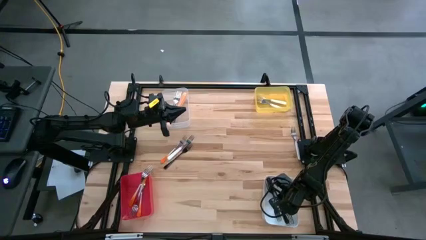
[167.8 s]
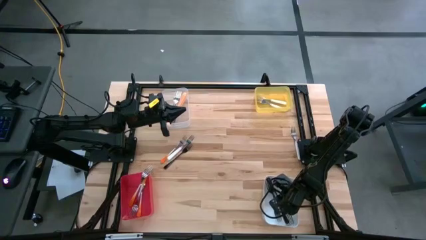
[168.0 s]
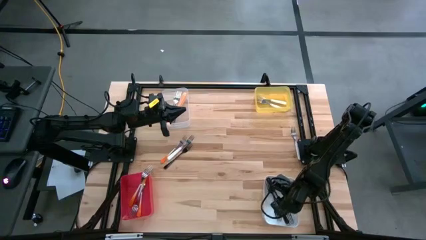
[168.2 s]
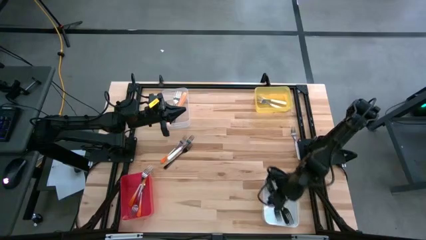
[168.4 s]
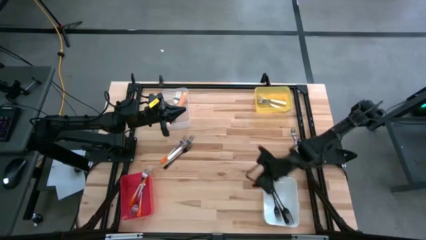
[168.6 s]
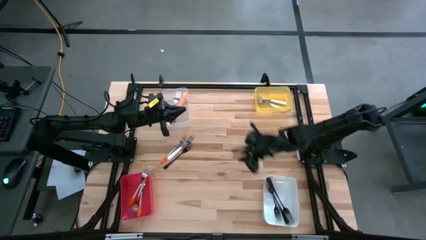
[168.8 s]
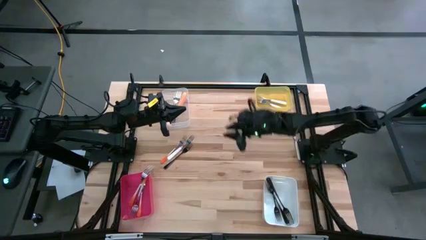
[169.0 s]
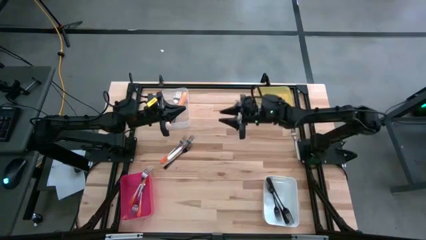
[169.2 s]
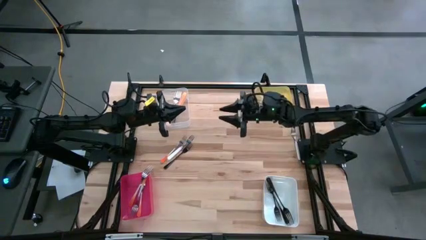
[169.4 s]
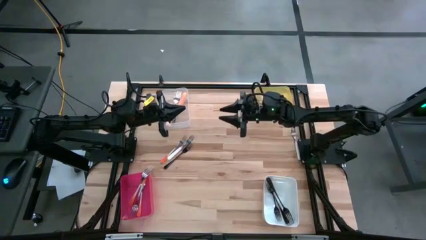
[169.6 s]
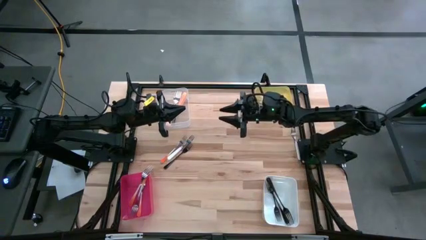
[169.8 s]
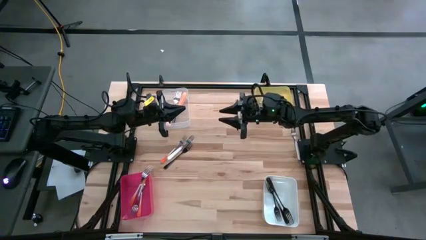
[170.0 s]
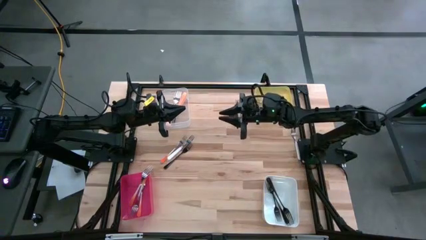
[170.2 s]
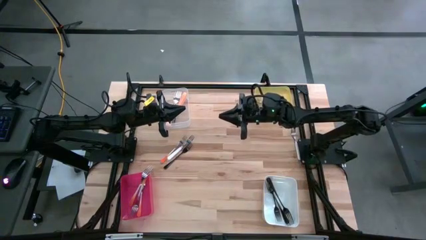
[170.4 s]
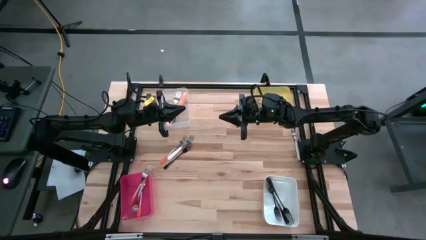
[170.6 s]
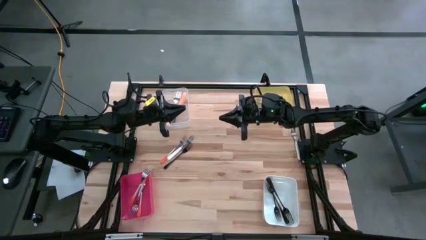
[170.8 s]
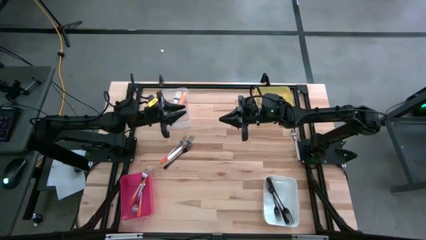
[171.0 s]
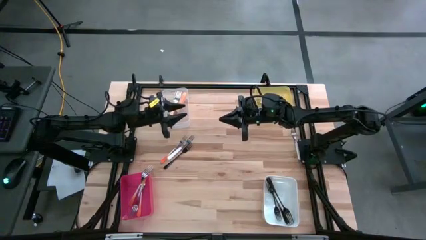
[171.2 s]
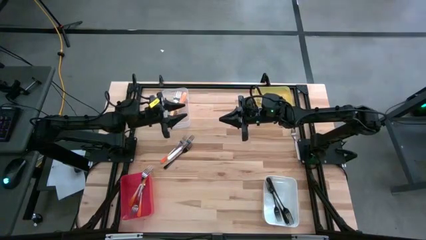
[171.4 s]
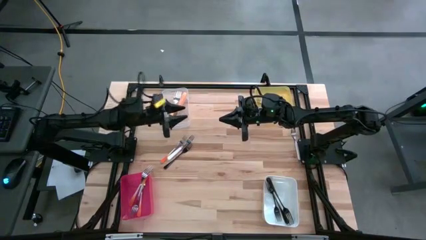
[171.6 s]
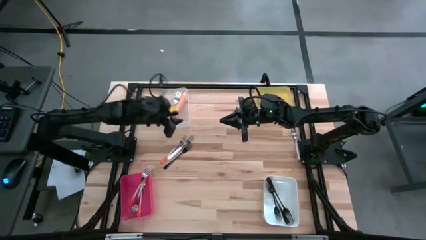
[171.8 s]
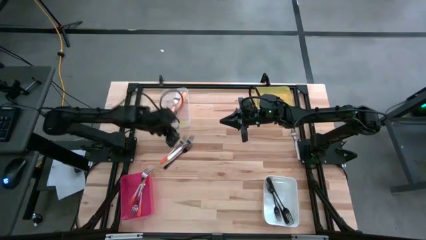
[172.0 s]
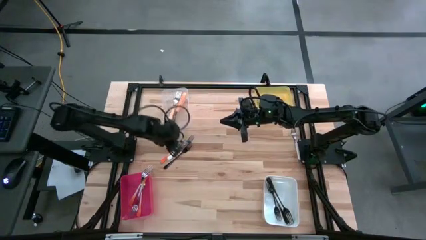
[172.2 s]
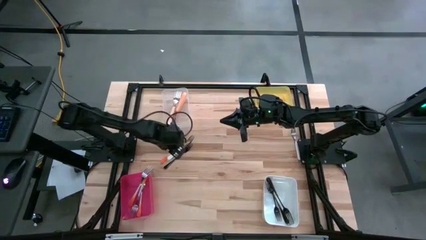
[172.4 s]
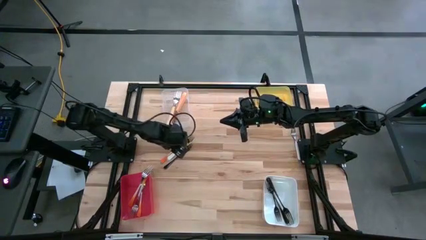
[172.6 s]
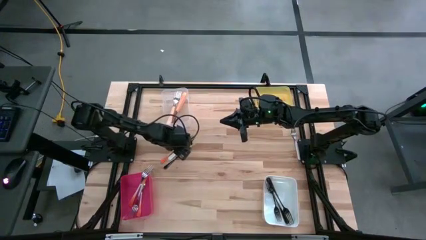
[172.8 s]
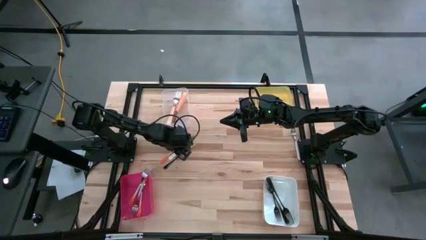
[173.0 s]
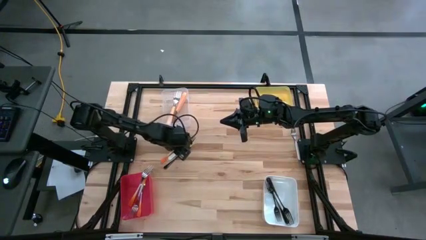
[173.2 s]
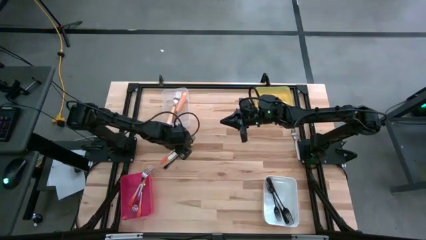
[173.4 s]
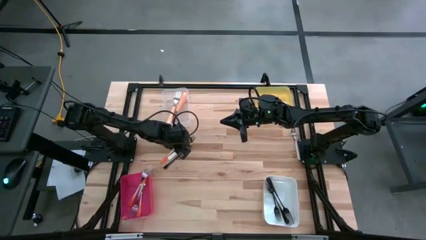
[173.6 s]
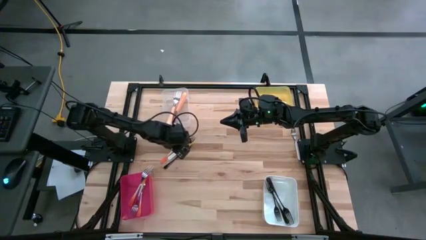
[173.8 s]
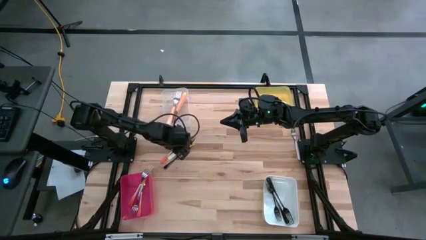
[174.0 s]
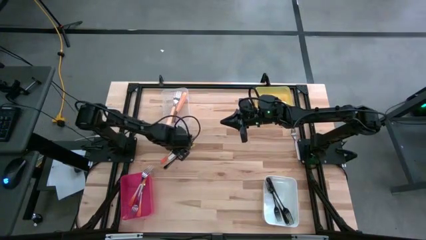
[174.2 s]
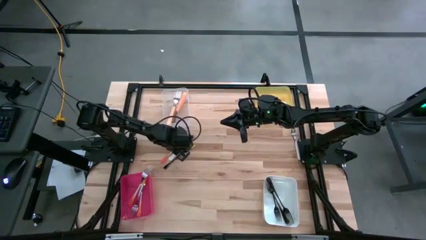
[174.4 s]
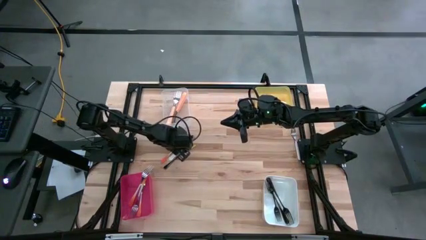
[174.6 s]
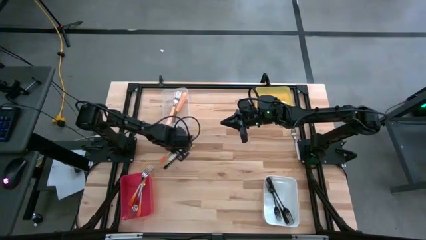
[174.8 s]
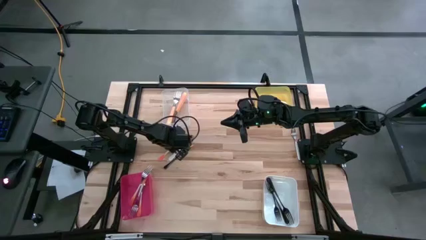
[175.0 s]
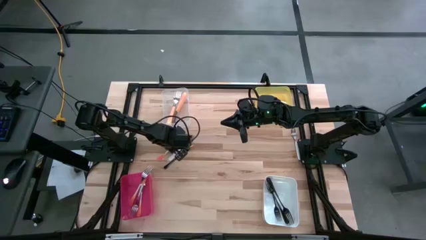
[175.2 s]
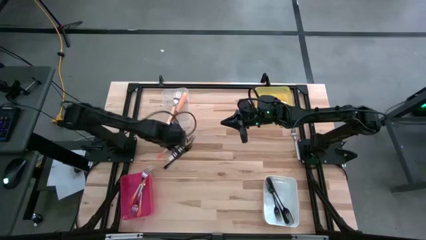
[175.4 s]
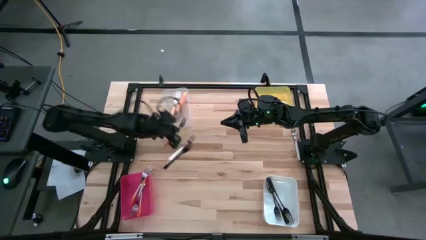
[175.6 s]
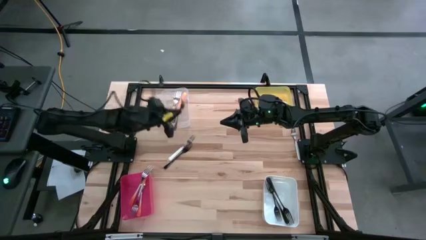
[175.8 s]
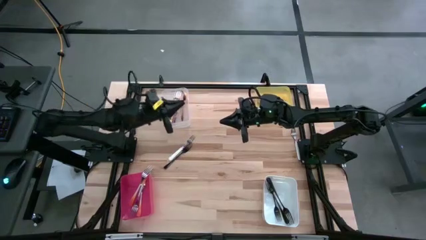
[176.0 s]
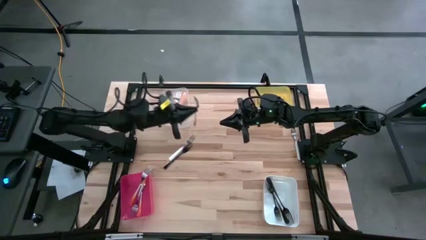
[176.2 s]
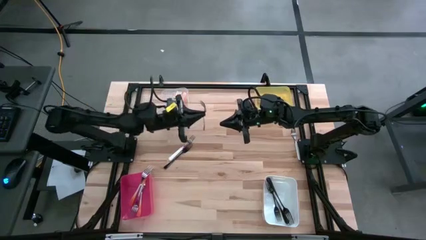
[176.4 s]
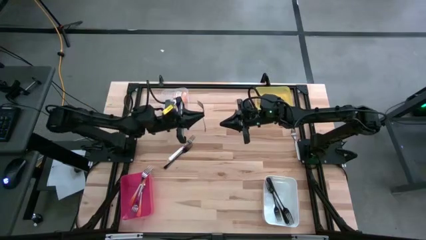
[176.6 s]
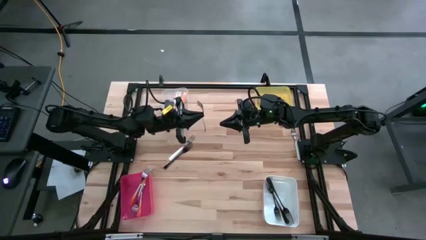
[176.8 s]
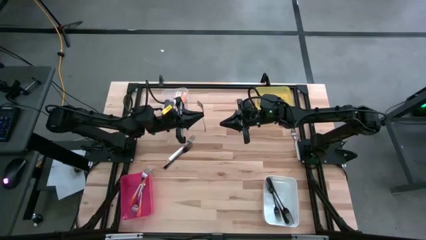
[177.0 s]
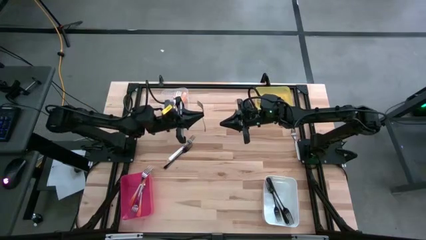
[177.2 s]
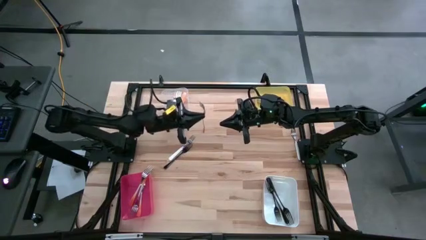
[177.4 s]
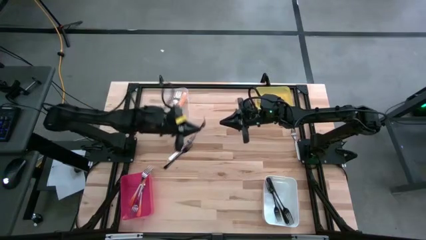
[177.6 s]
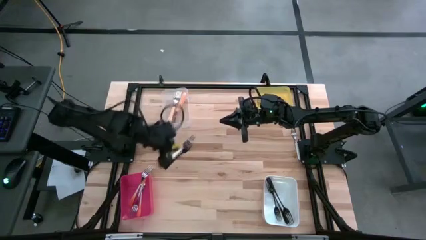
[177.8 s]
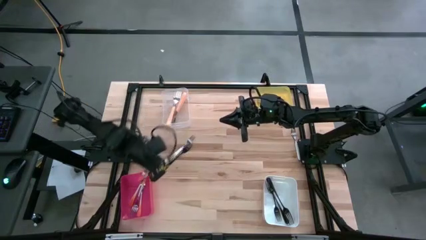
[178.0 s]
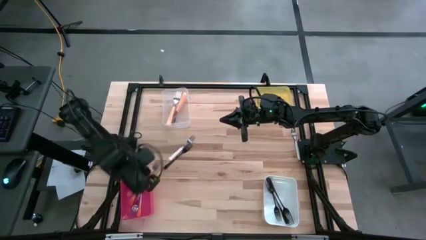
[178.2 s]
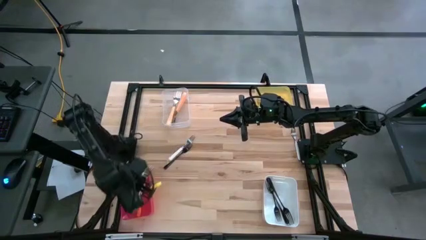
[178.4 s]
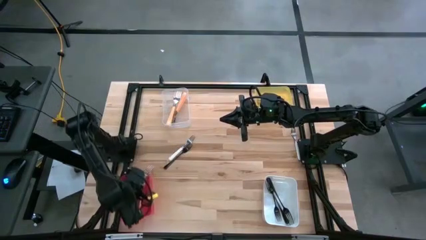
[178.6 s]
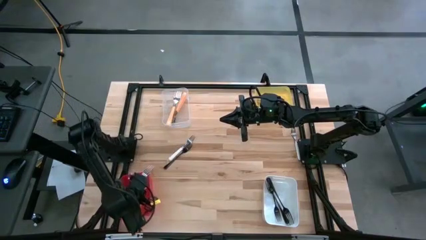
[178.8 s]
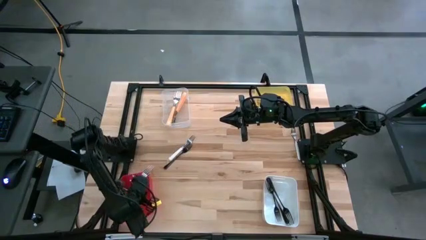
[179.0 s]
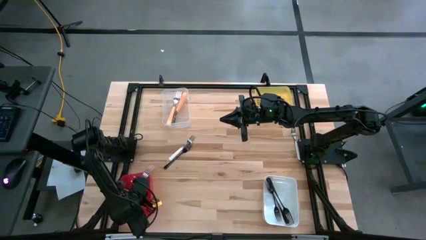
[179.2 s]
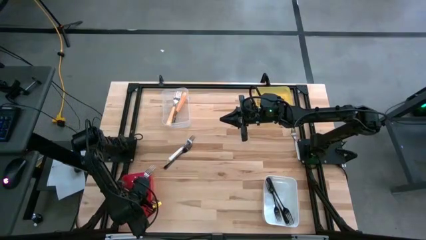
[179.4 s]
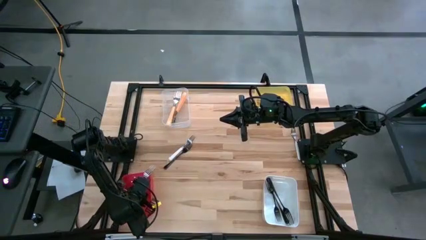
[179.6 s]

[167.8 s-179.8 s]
Task: Sort silverware by color (type)
Put the orange-white fork into the red bin

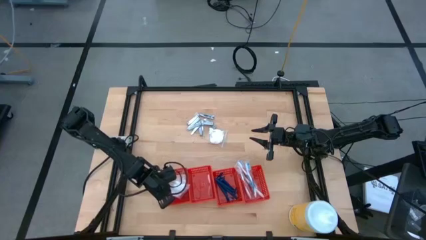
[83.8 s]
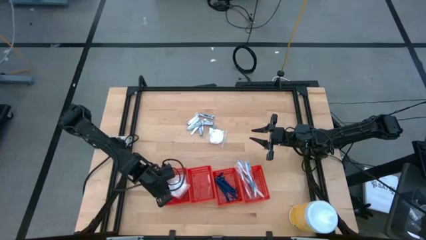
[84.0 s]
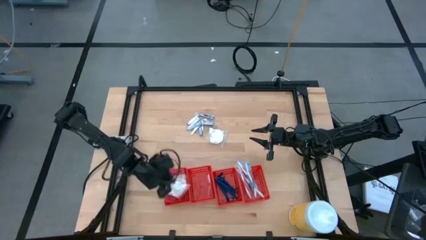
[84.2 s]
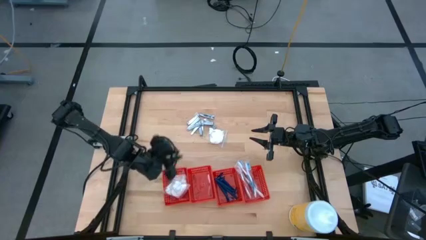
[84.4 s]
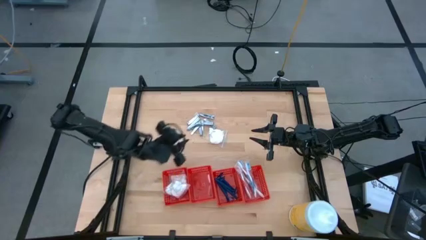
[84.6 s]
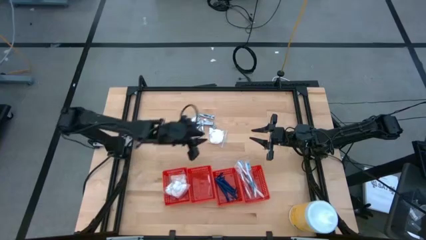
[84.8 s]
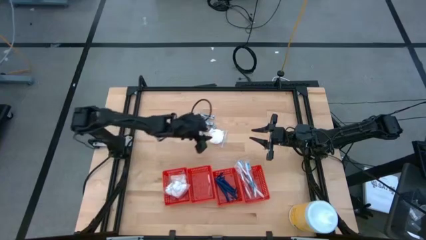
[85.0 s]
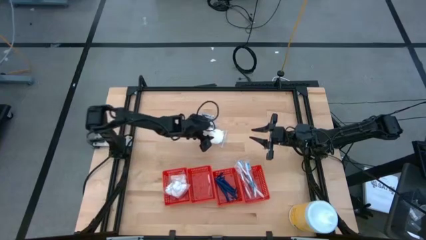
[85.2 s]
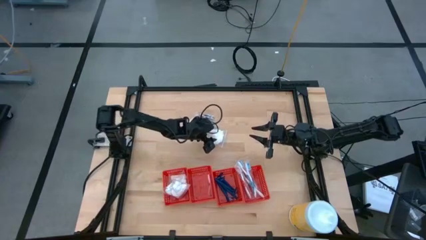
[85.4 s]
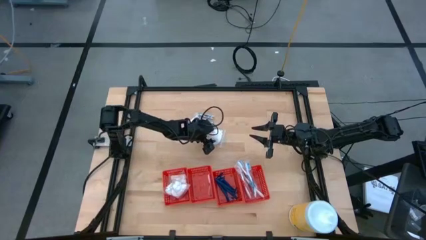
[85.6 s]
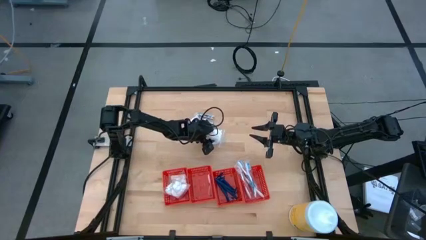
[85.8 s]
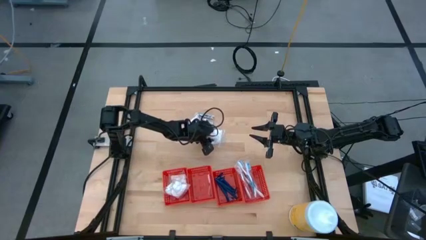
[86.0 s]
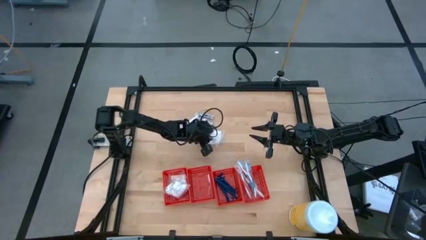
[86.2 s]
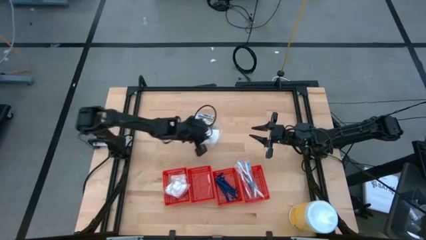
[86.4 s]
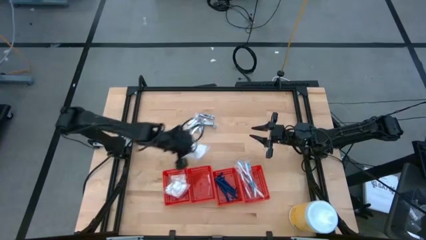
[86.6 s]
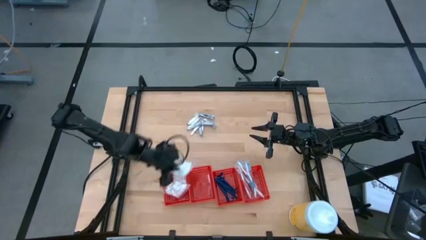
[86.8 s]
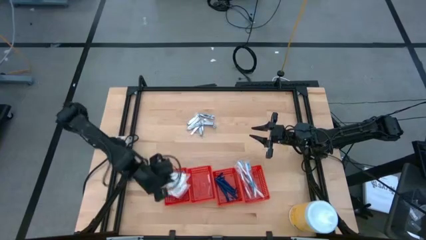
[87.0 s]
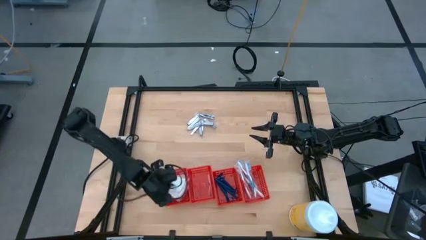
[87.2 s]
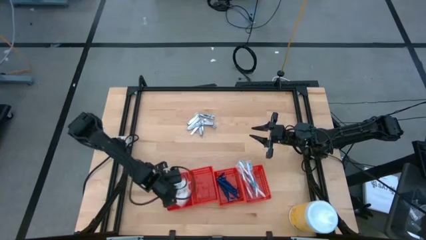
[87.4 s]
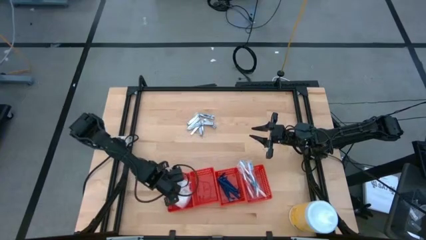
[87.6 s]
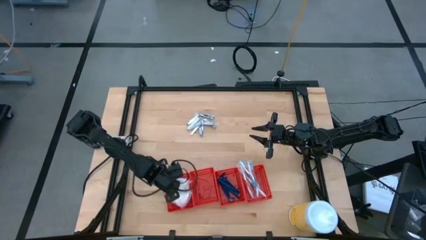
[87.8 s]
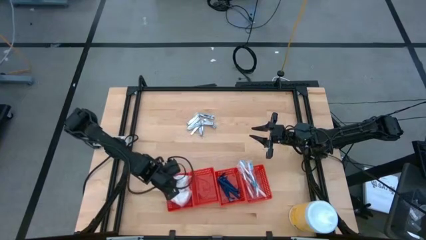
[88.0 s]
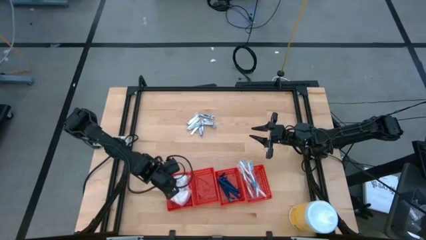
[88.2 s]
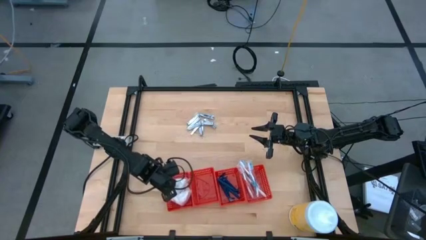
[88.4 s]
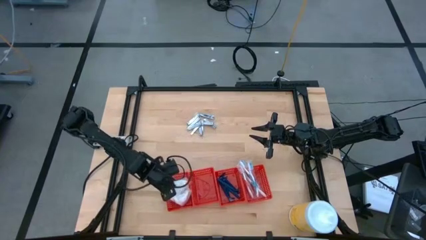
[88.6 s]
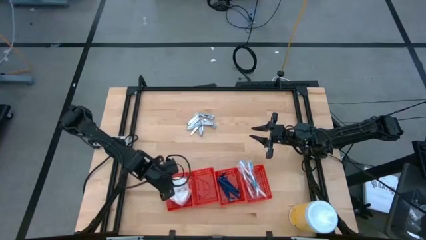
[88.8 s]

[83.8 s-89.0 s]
Task: Pick & Place Travel size toiletries
Put the white cotton packs into the left red bin
